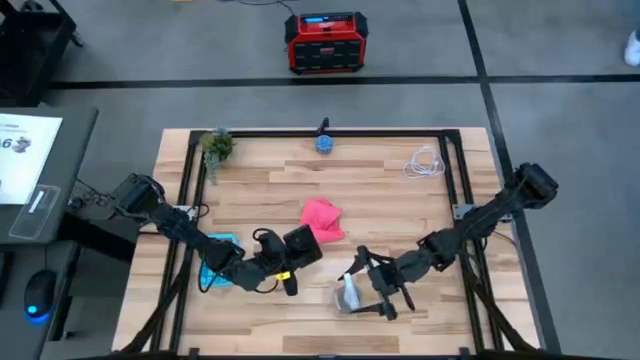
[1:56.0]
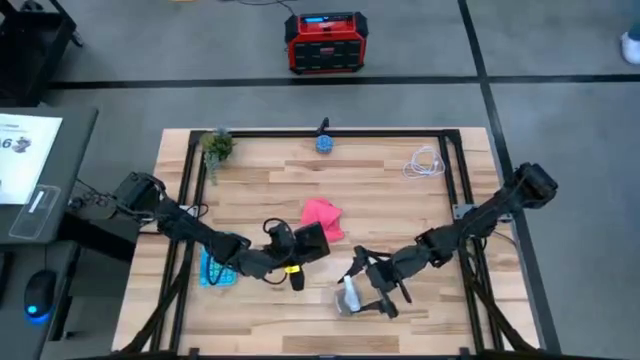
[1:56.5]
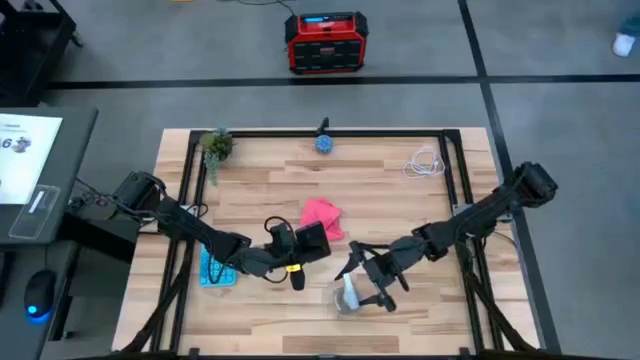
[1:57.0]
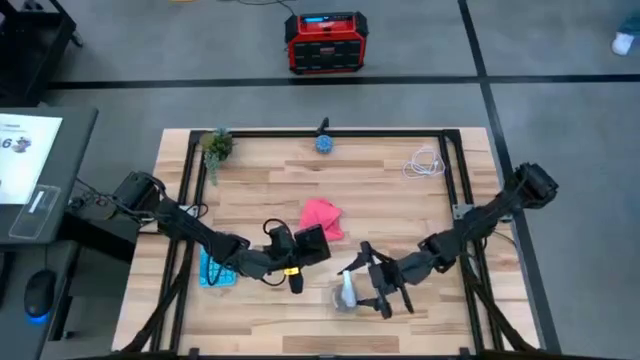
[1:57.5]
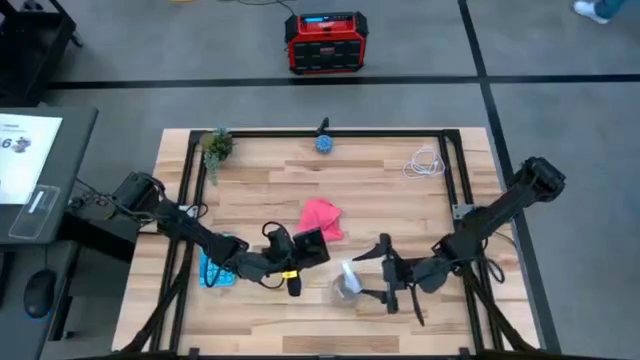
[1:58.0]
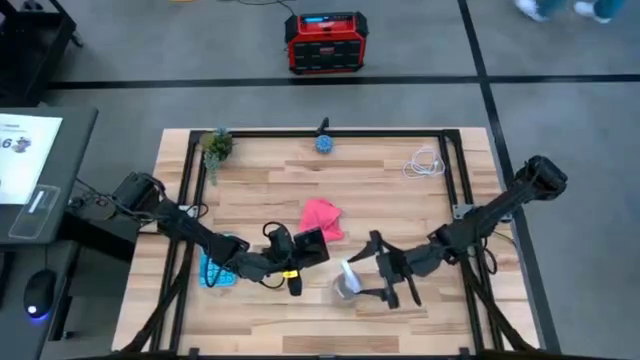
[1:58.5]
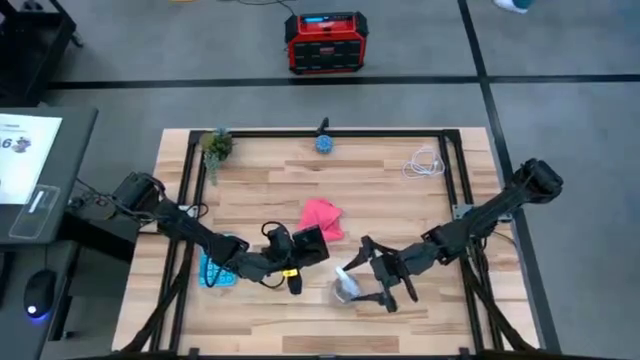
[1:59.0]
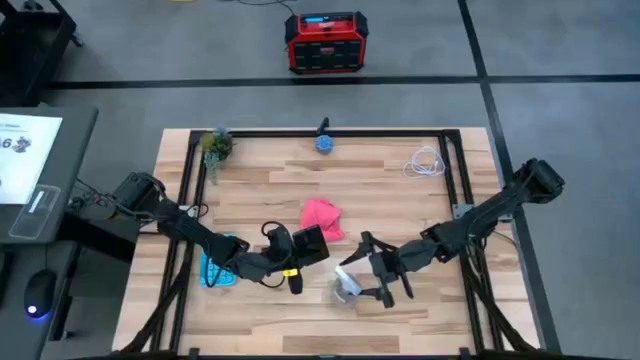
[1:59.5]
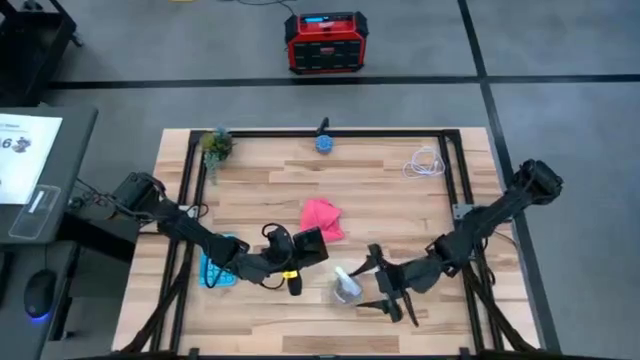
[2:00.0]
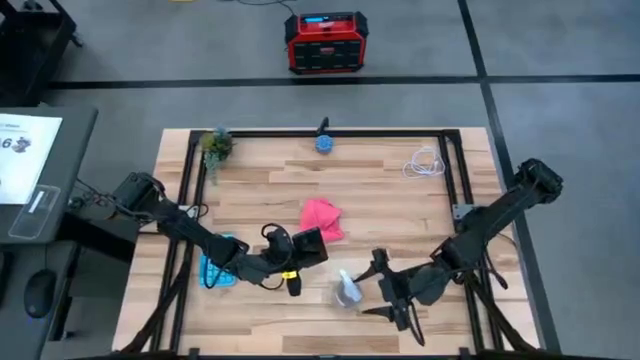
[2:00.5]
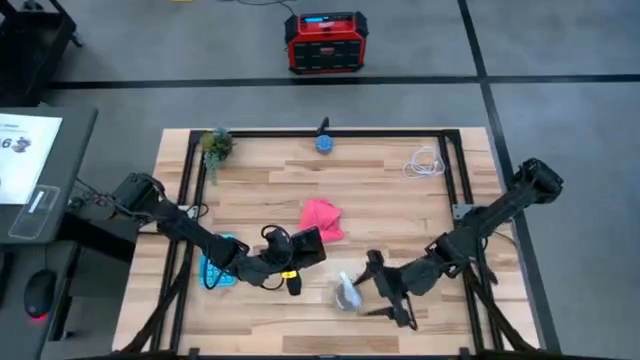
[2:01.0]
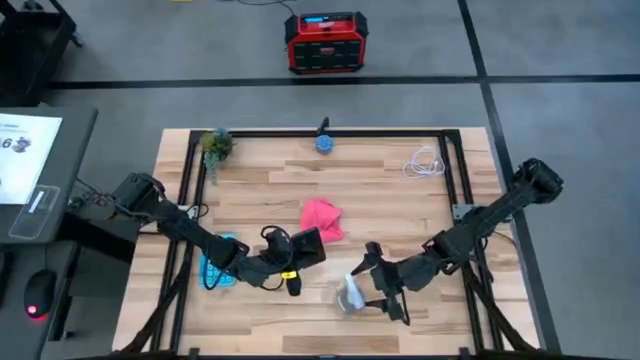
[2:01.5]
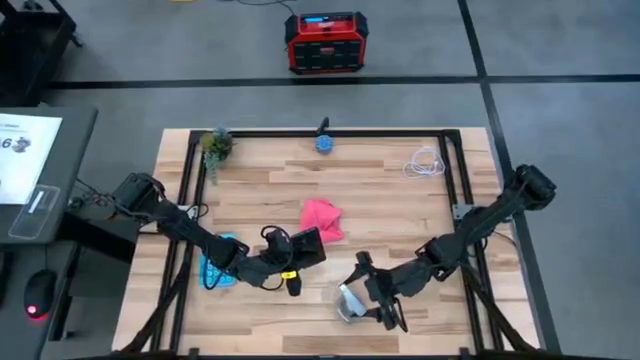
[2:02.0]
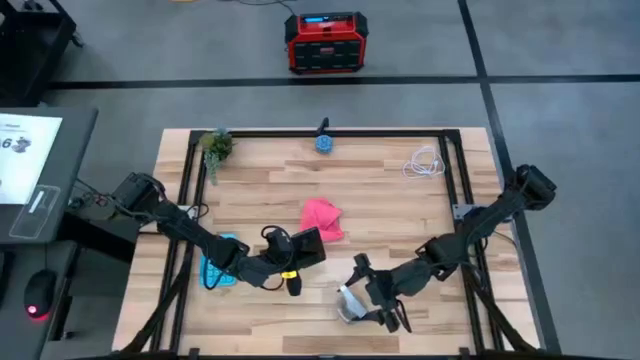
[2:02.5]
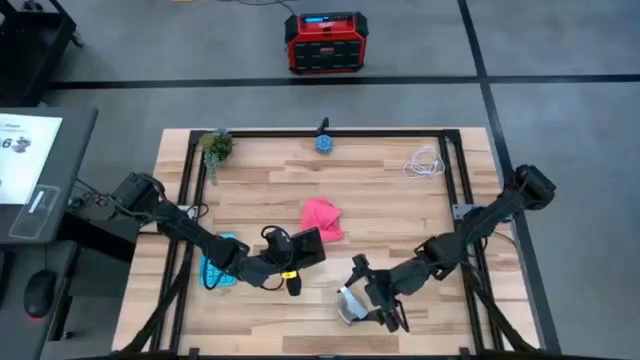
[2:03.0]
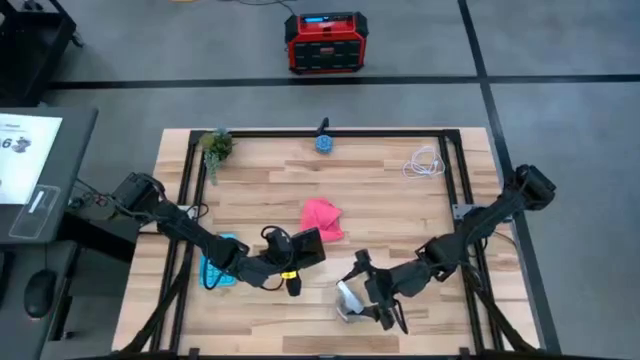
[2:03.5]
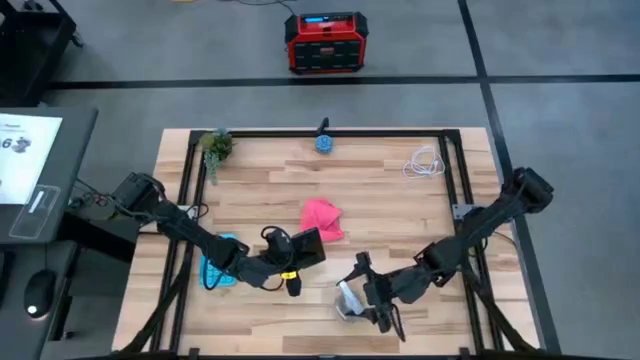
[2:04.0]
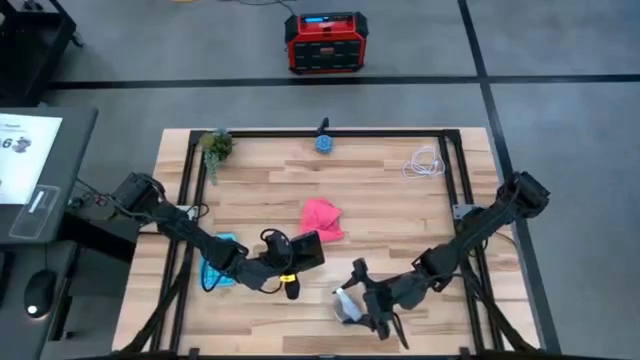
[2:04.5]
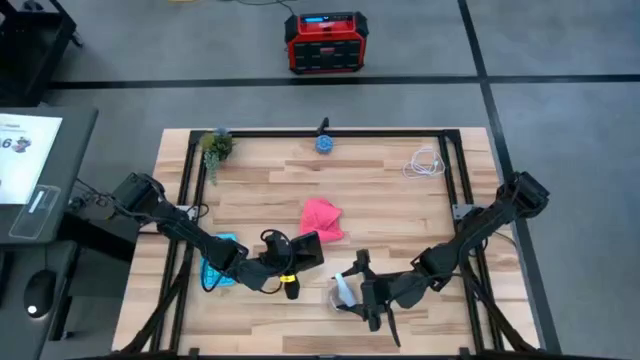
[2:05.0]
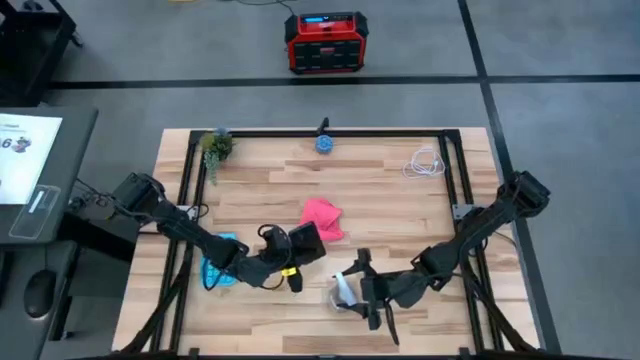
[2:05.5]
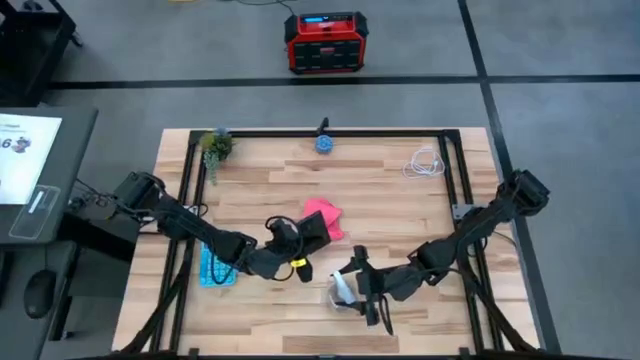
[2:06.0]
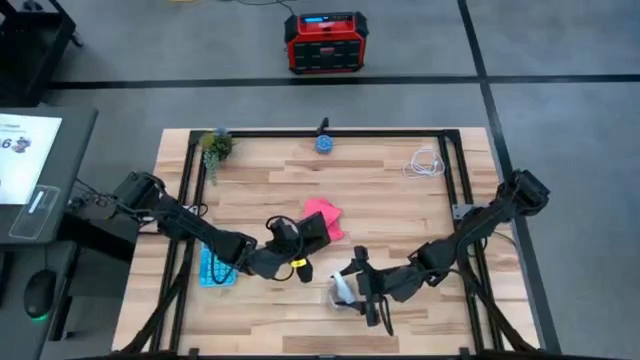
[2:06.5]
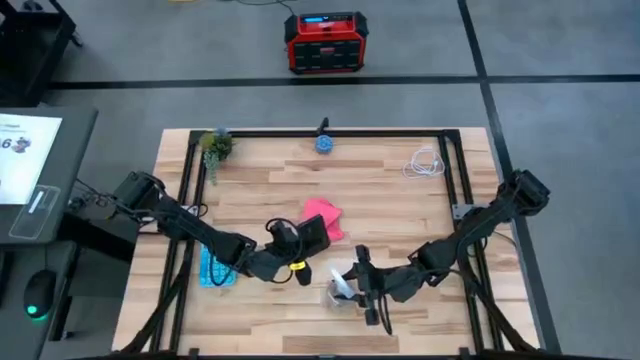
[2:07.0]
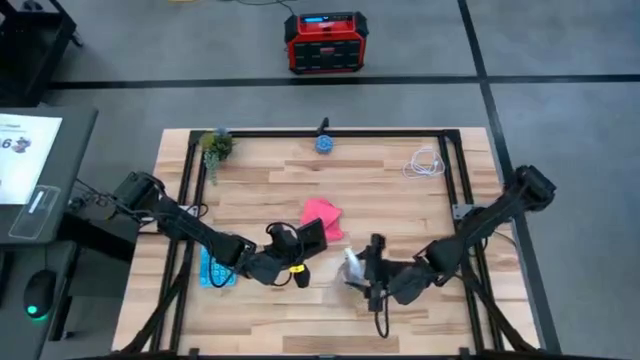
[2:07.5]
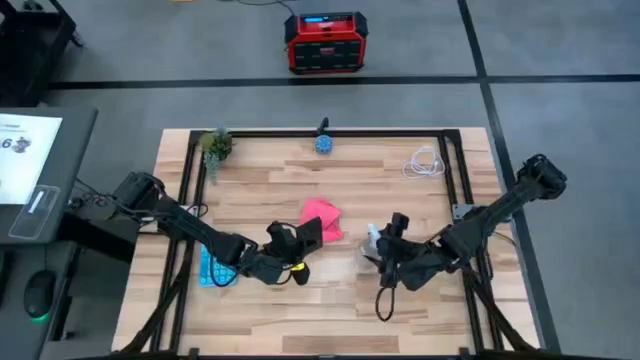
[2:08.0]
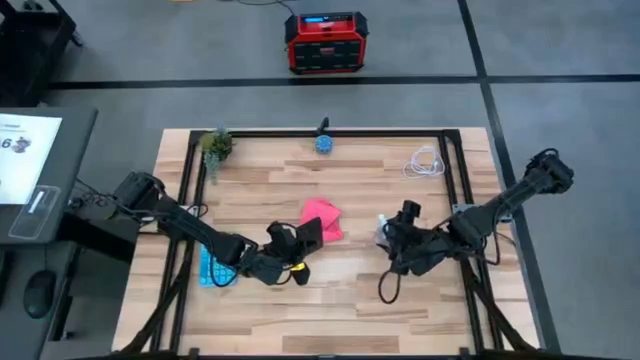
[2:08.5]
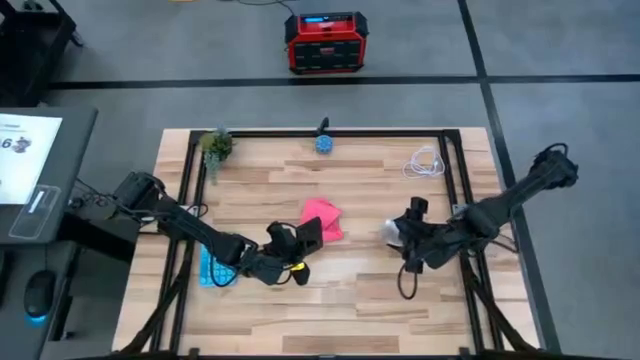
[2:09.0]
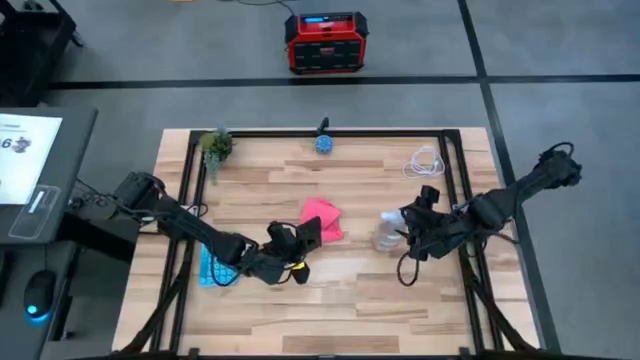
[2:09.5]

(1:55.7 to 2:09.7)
Task: Apply microfiber cloth
Spray the back of the black cellphone using transparent spray bottle

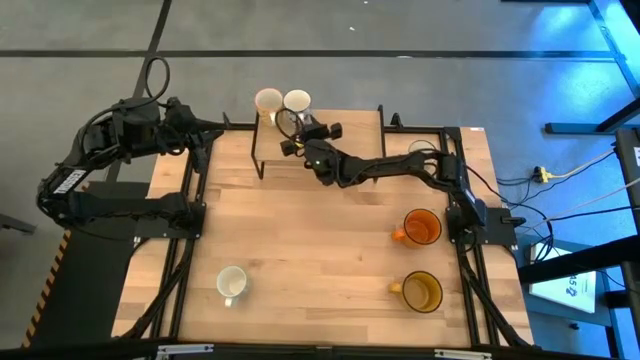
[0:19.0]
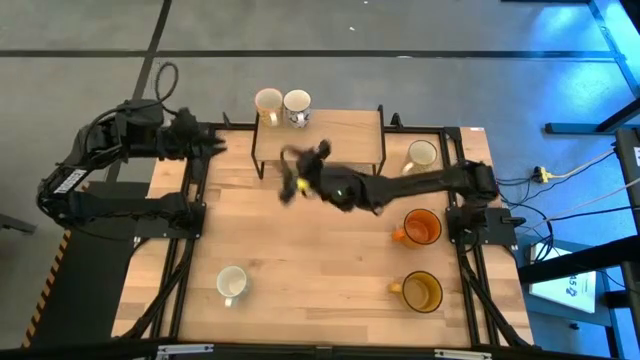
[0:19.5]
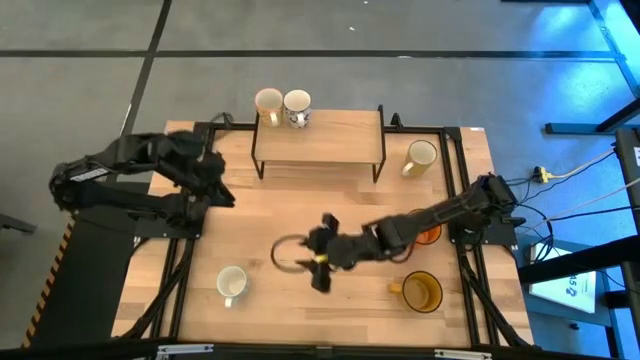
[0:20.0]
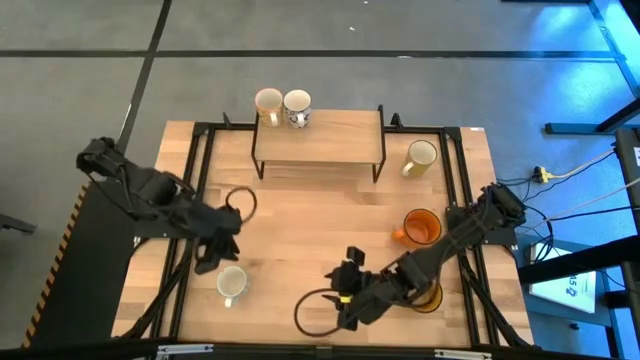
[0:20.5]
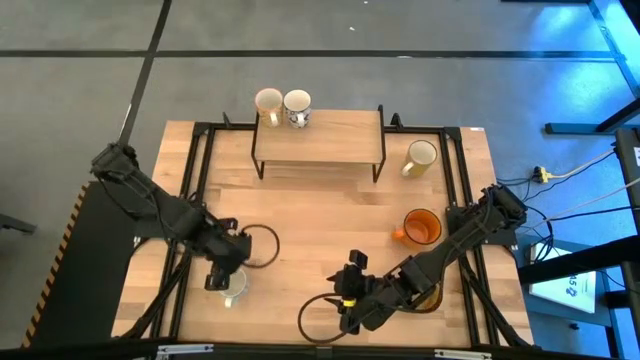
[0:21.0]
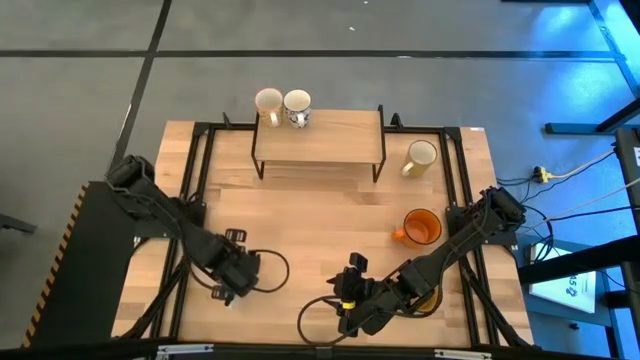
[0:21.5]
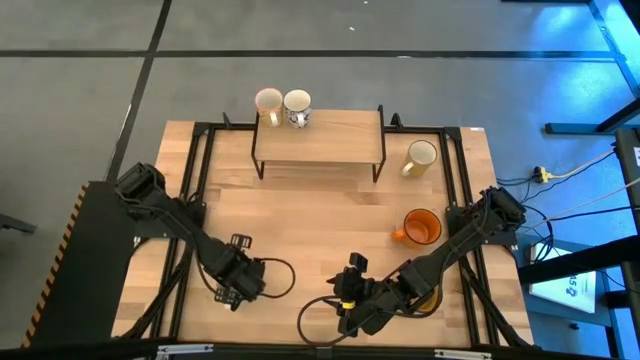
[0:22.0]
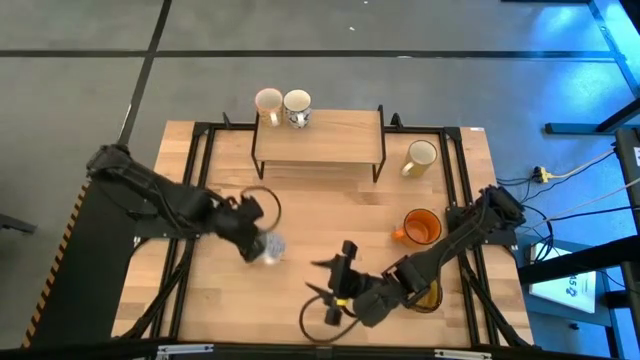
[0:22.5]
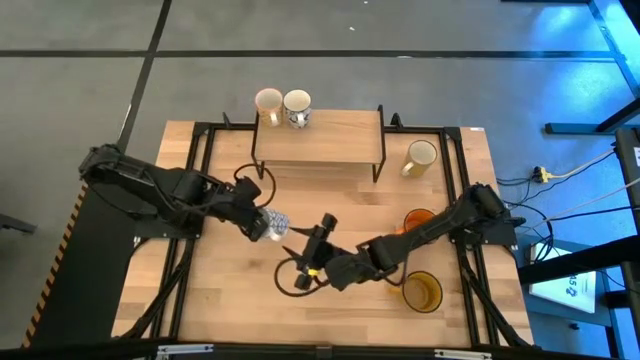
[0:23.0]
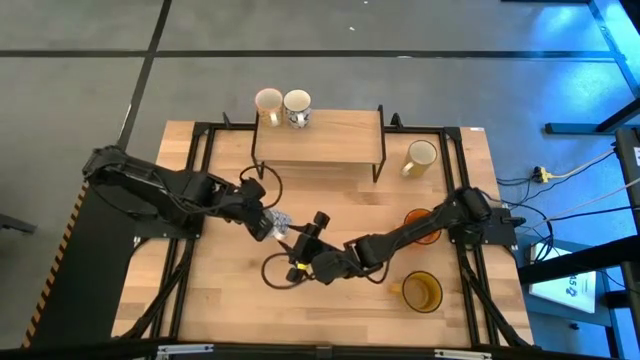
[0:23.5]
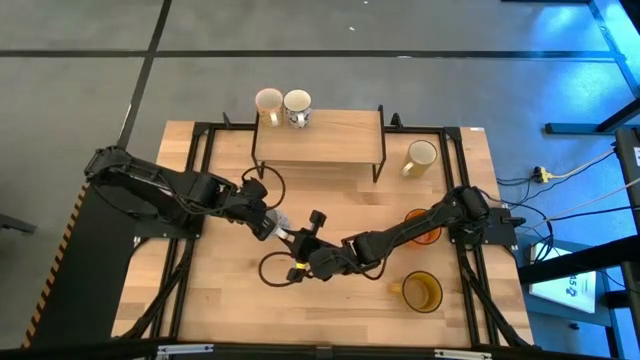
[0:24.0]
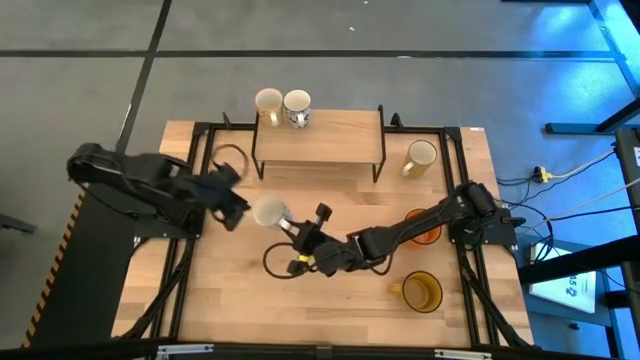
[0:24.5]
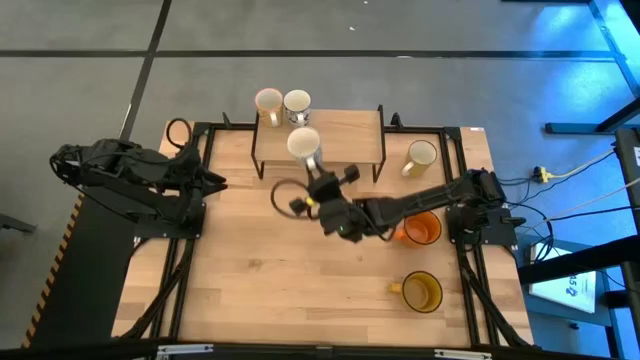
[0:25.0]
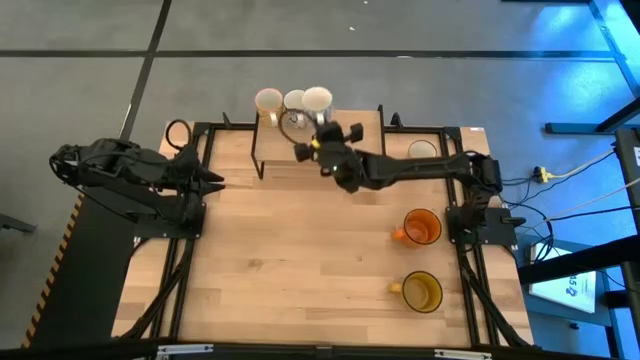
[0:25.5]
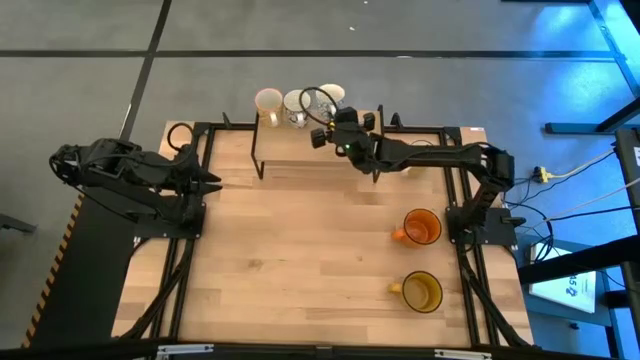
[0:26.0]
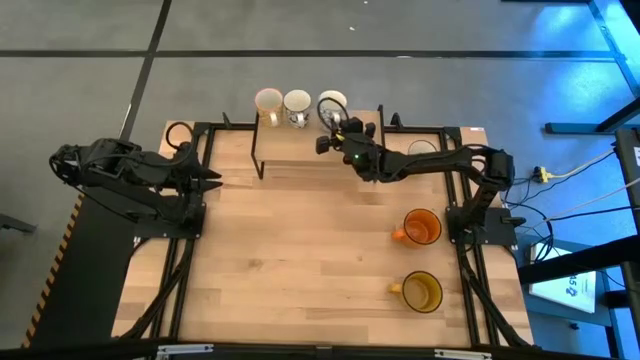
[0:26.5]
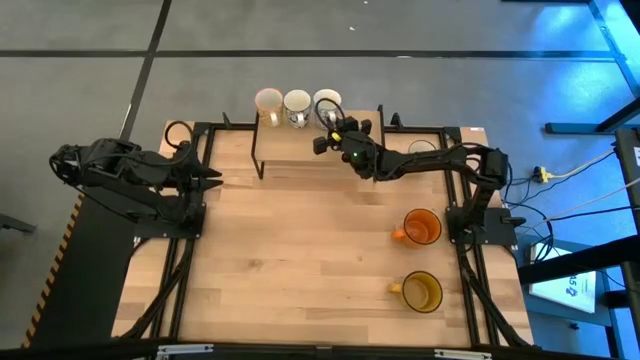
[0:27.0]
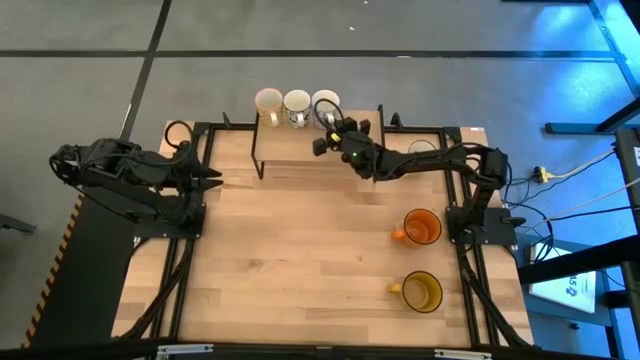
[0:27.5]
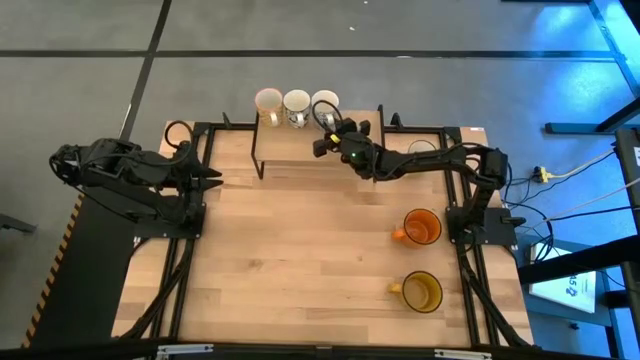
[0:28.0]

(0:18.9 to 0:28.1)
Task: Place coffee mugs
Put the light blue patterned mug on the shelf
